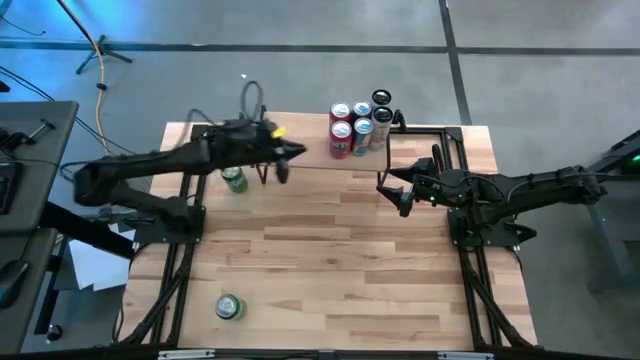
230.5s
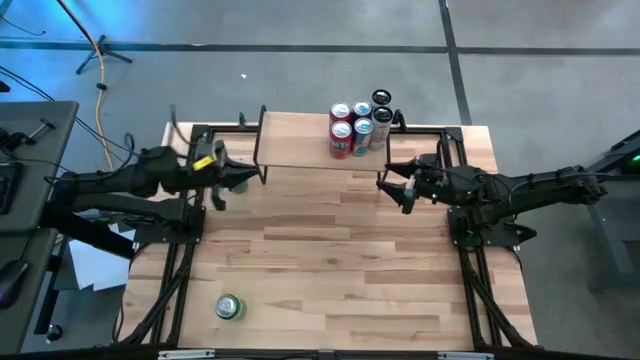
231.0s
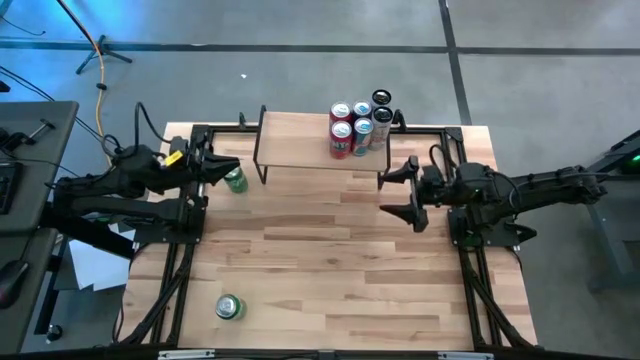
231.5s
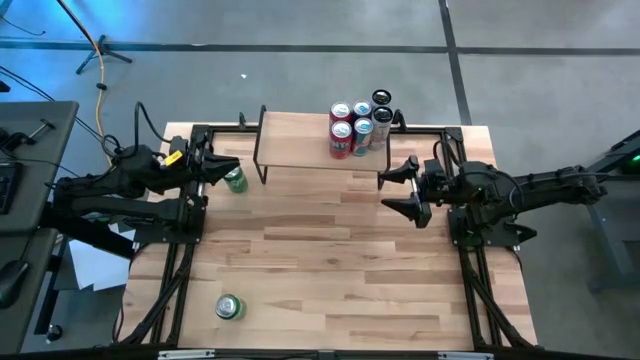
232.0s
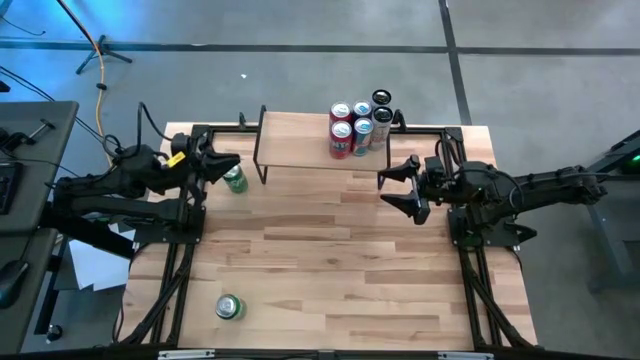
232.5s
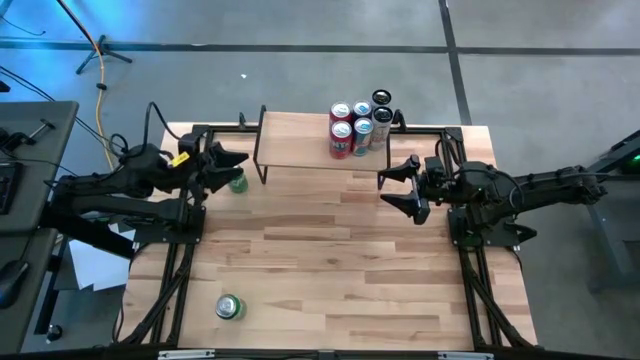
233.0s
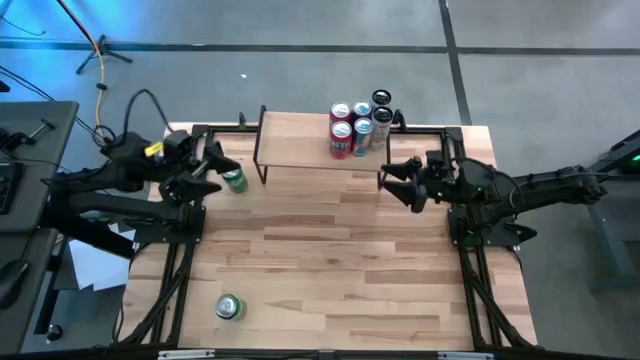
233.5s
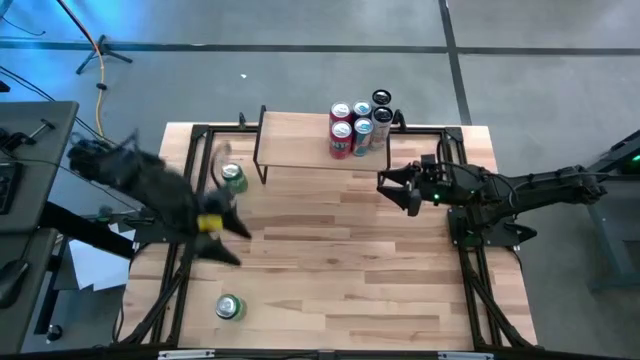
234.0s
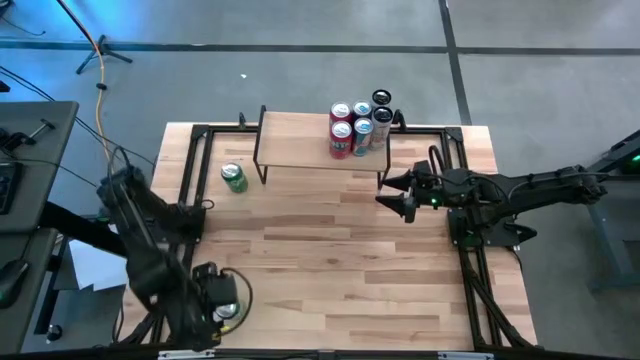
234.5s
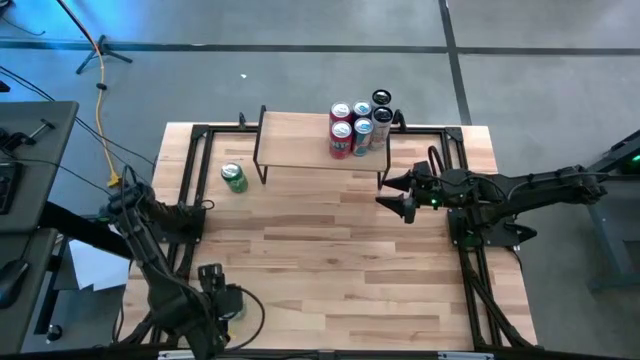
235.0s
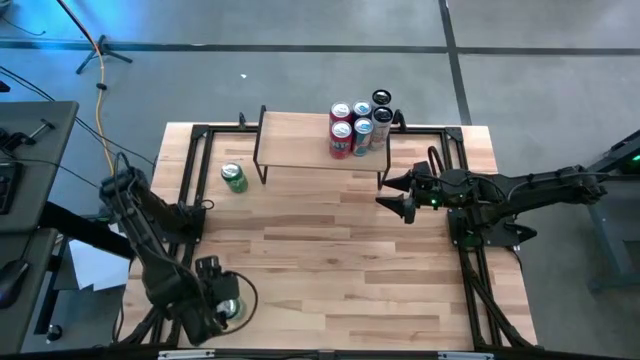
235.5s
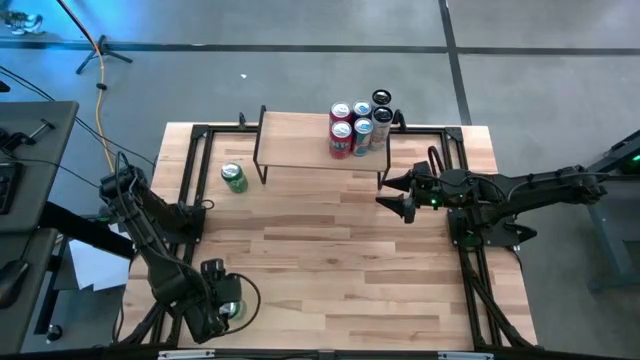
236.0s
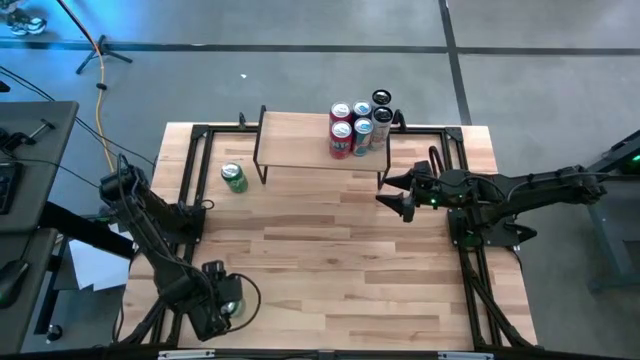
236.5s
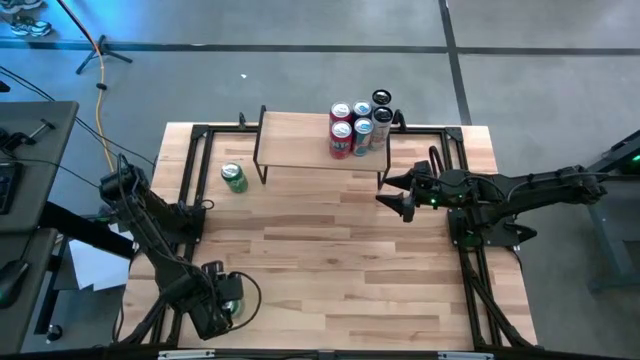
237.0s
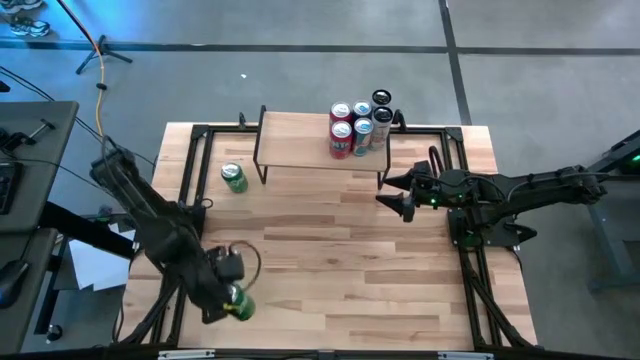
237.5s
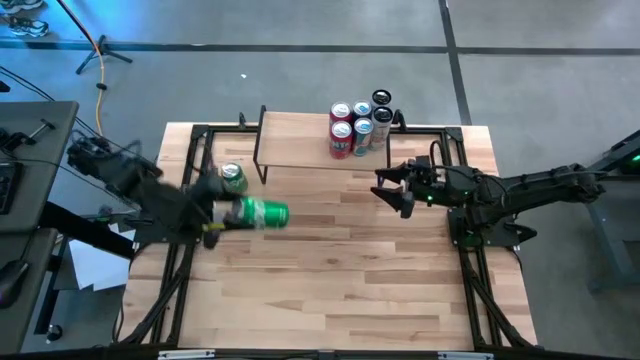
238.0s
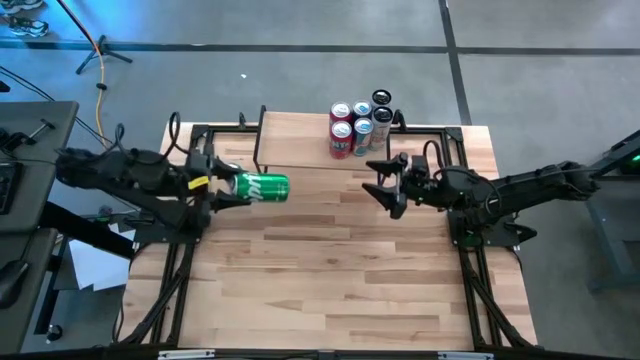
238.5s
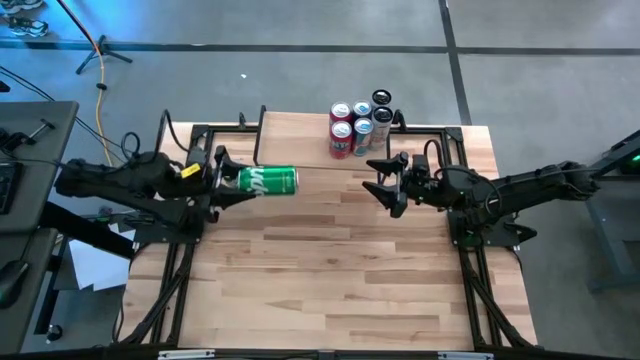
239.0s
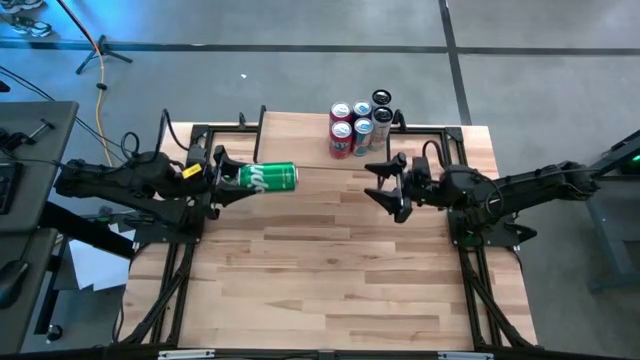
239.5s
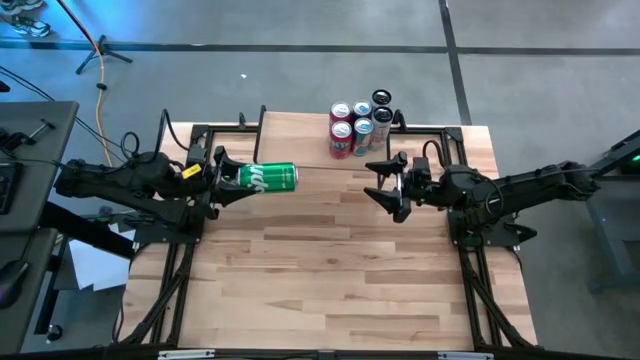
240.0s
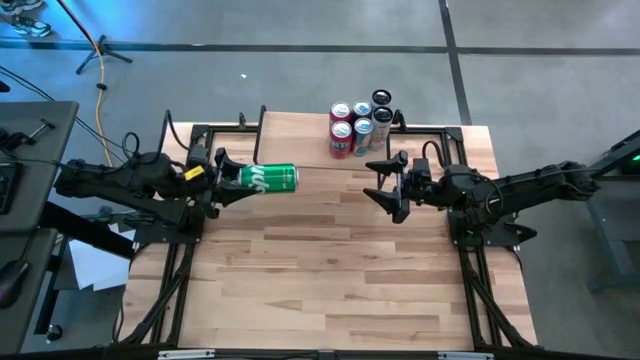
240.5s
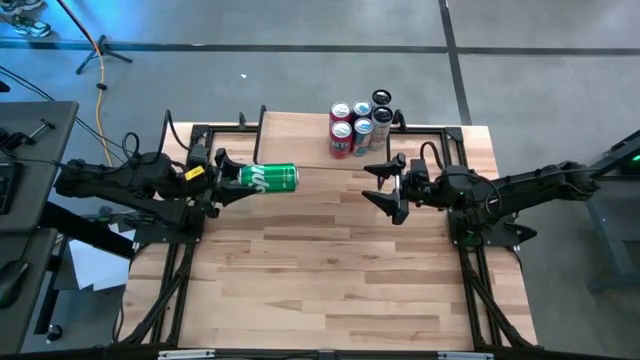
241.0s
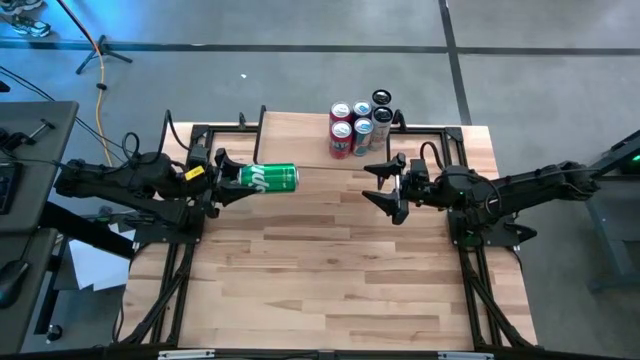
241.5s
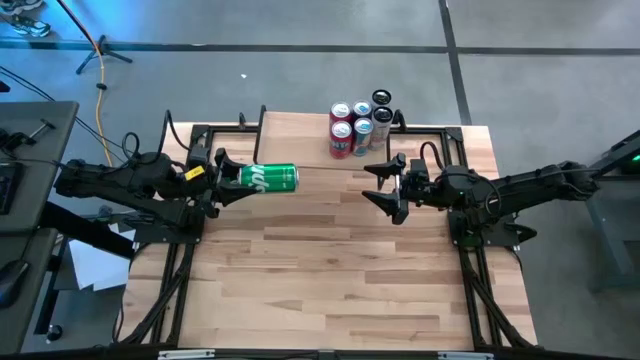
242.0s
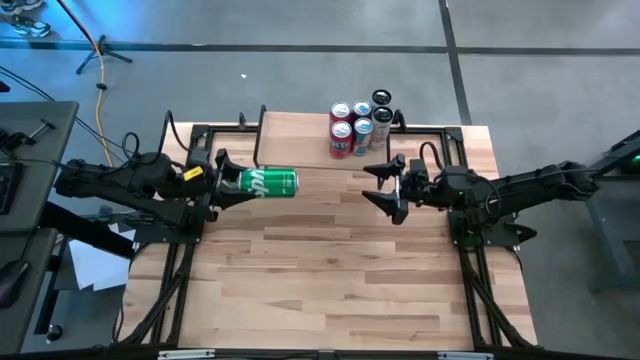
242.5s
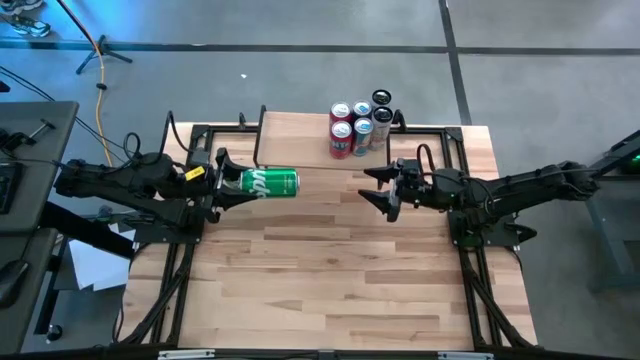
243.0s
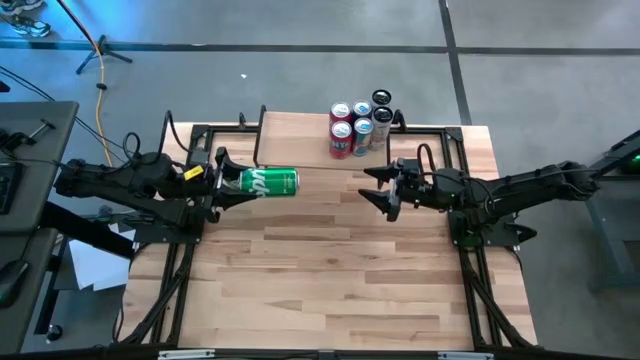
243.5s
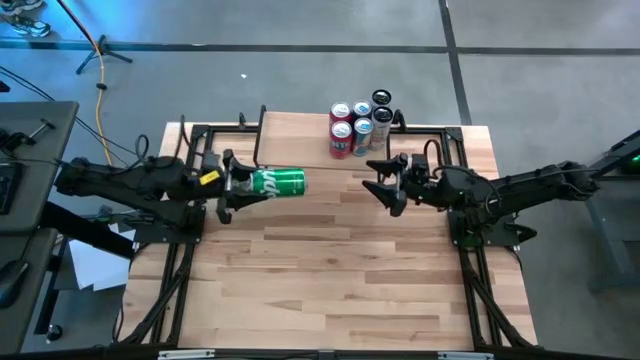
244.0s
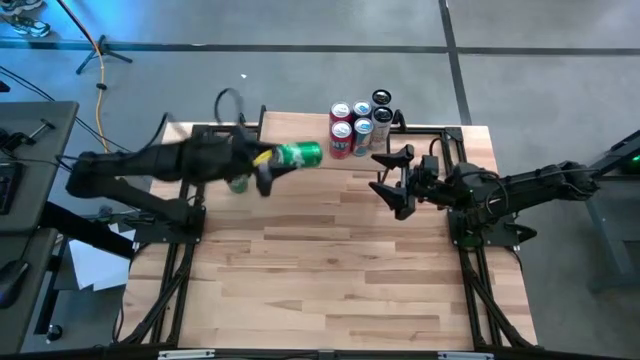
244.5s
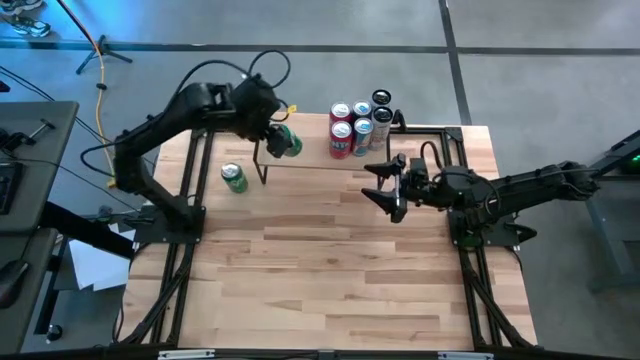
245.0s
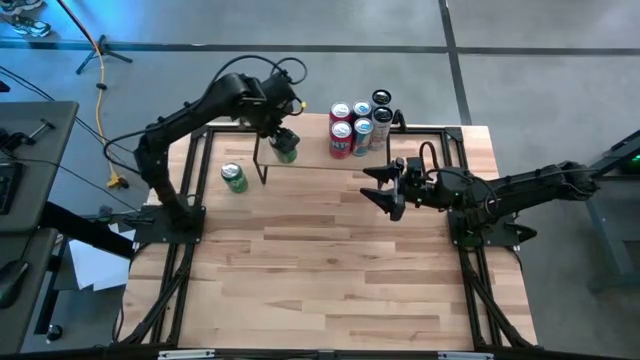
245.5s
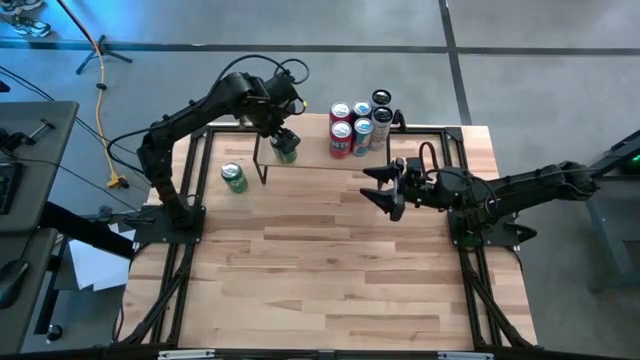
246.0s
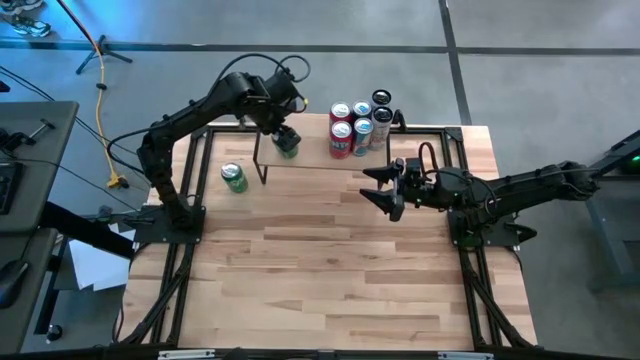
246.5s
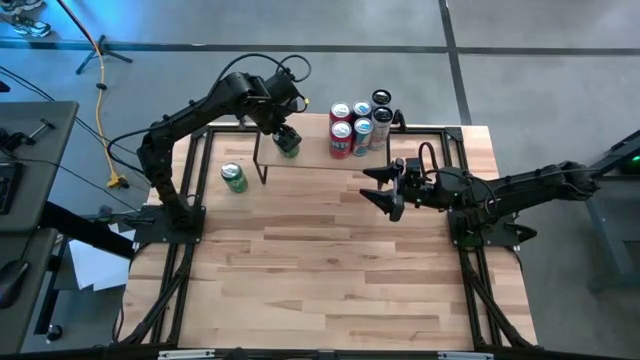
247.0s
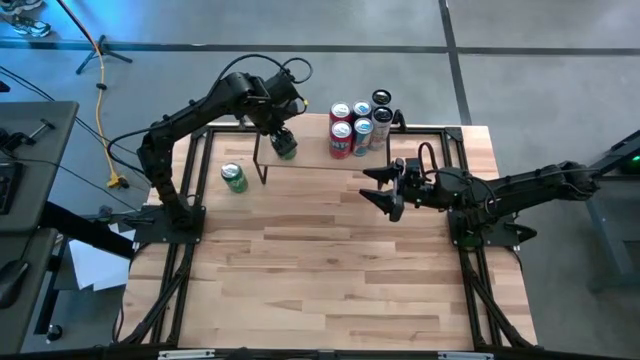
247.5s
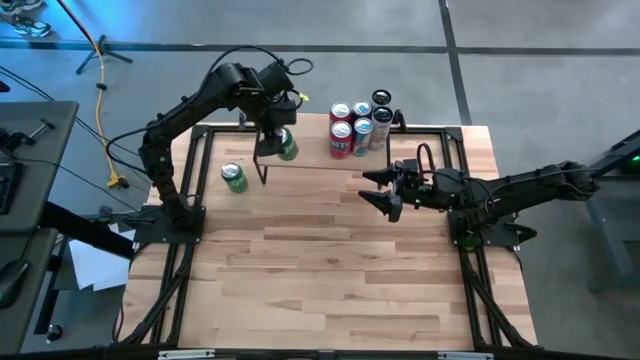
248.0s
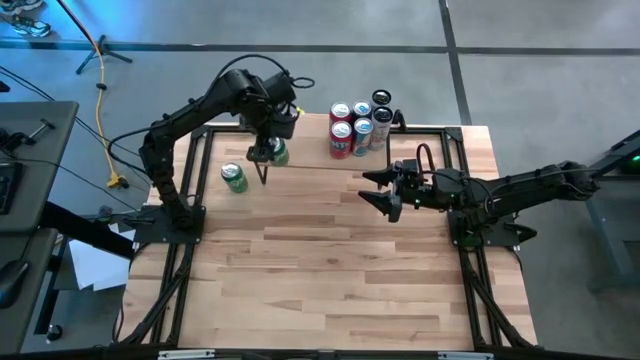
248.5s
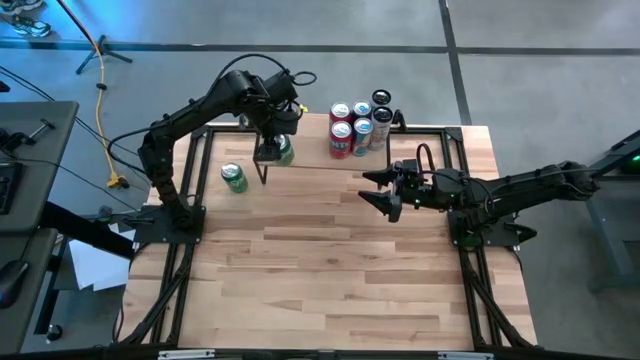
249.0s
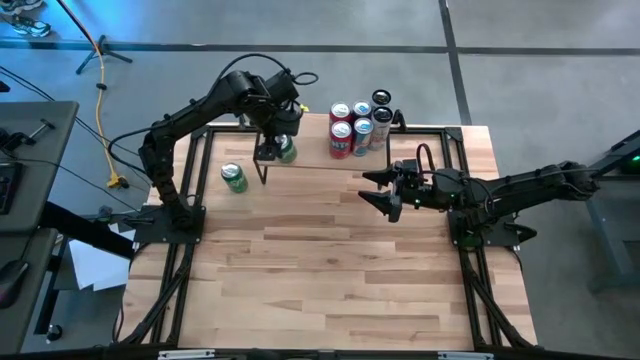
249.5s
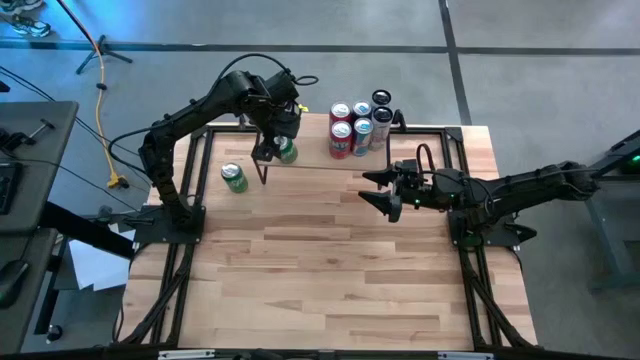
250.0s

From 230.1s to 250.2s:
Task: Place canned beverage on shelf
Put the bottom green soda can on the shelf
